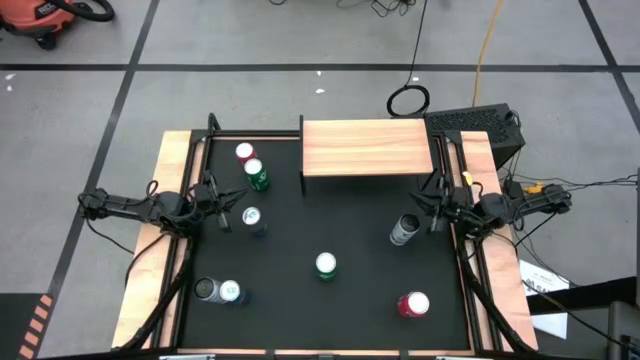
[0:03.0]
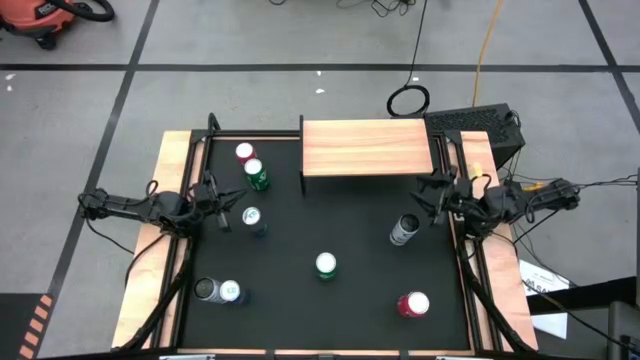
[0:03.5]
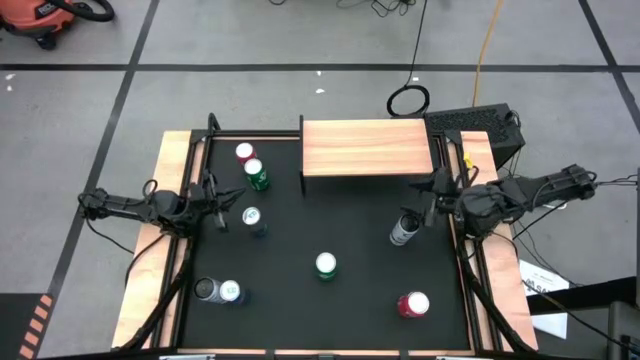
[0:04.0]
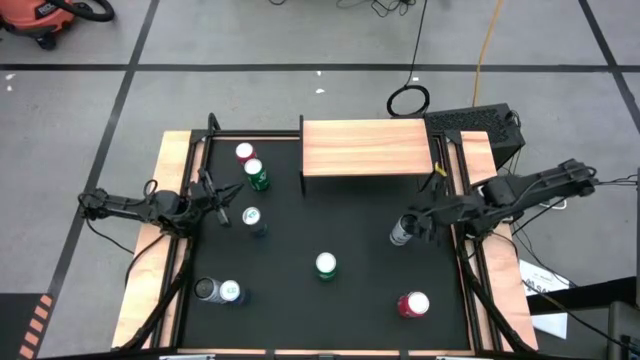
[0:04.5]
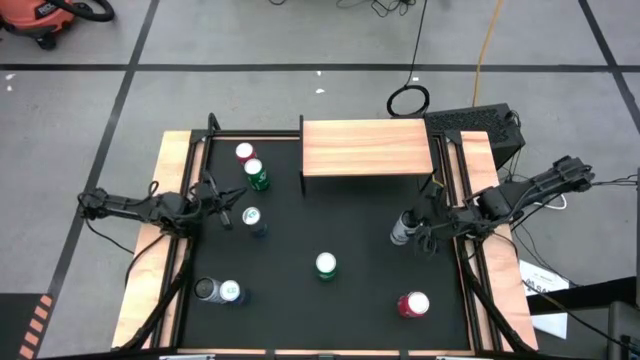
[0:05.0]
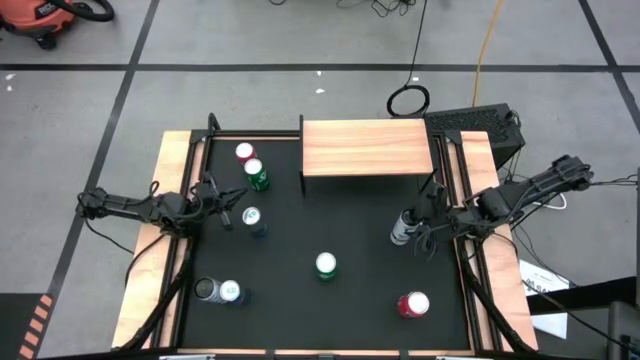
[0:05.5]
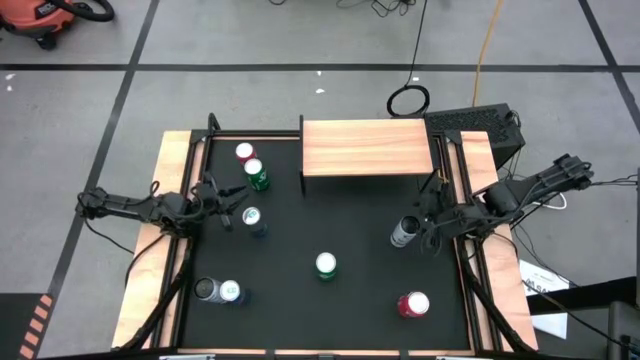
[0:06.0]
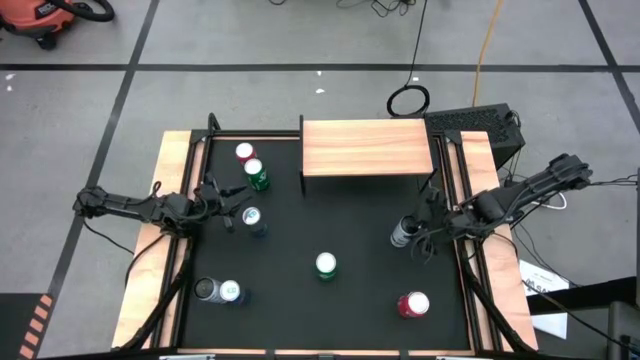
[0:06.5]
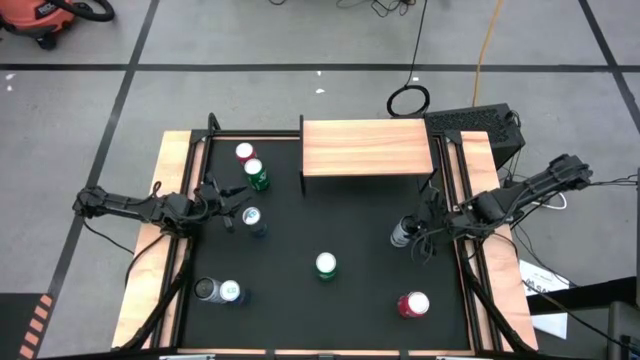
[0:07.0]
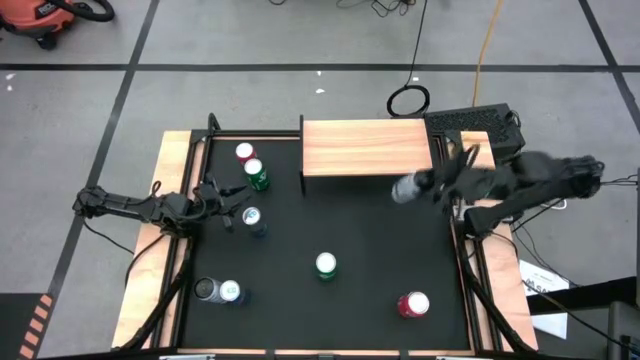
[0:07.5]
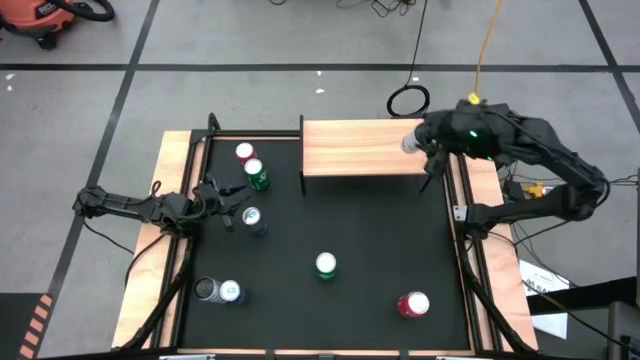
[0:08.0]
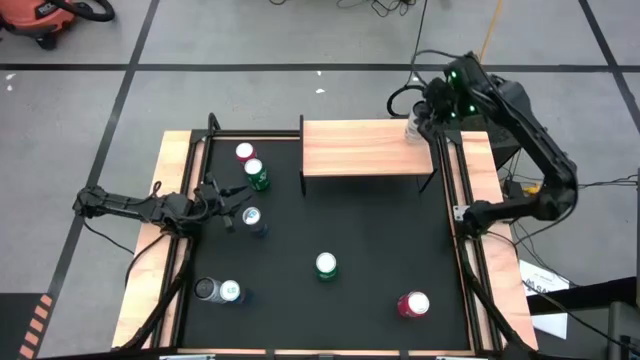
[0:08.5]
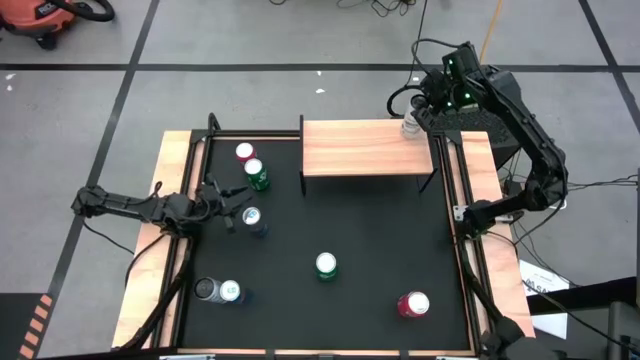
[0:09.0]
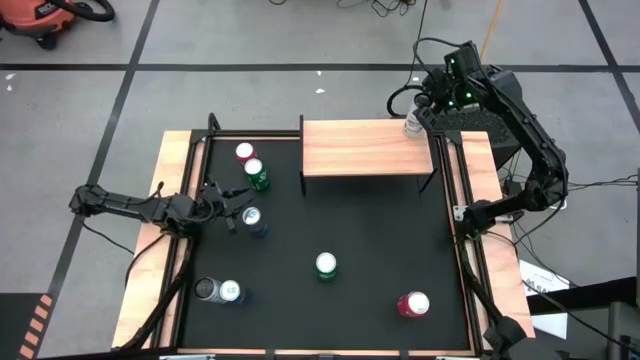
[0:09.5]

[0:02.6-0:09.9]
Task: Place canned beverage on shelf
Put the right white blue soda can on the shelf

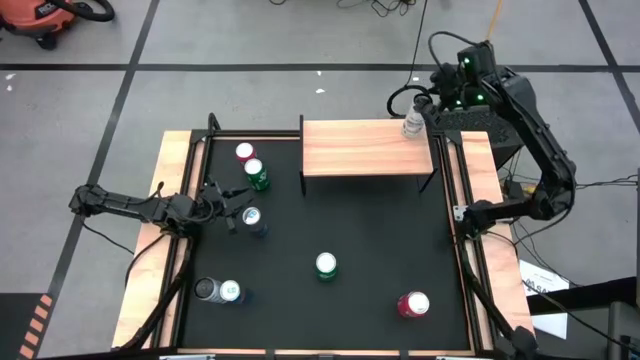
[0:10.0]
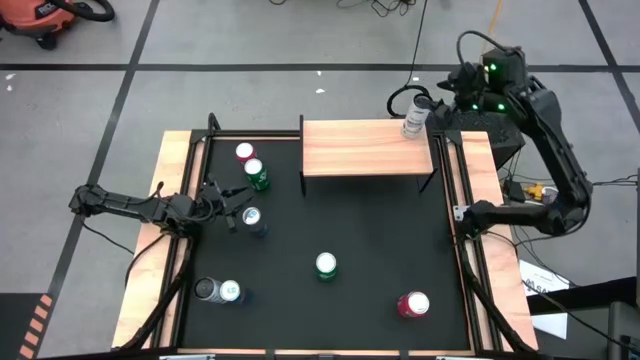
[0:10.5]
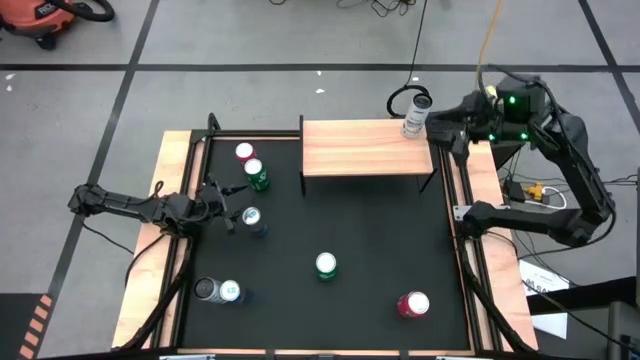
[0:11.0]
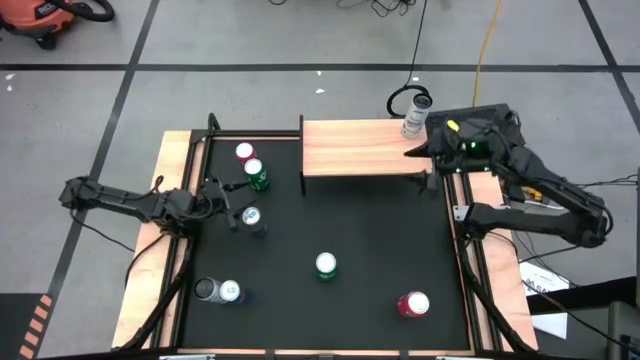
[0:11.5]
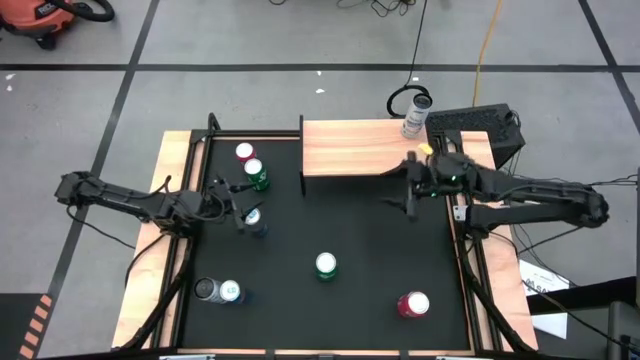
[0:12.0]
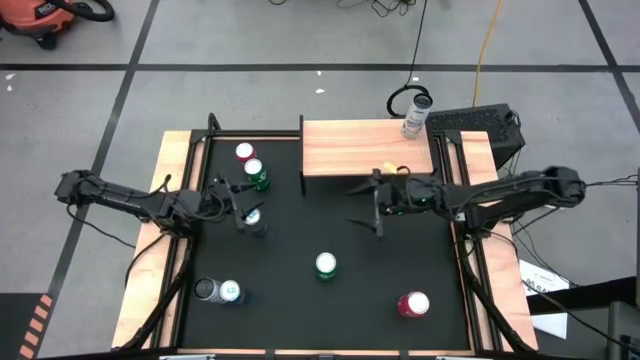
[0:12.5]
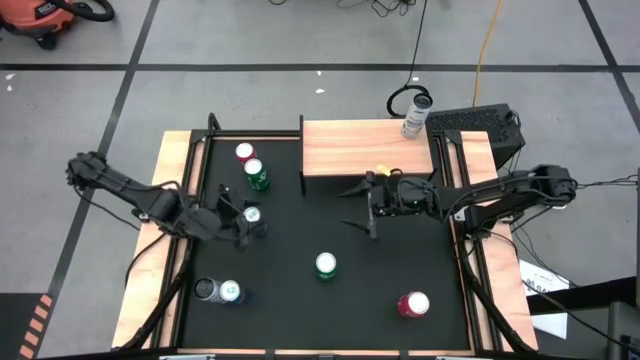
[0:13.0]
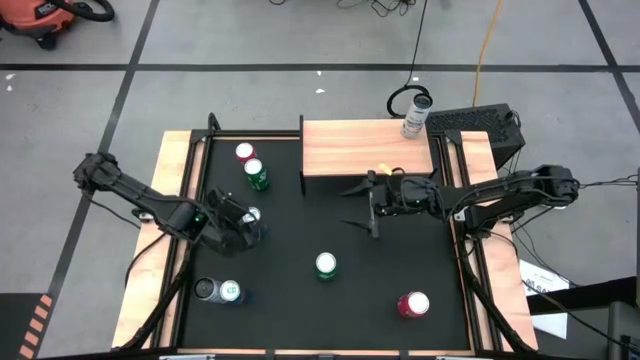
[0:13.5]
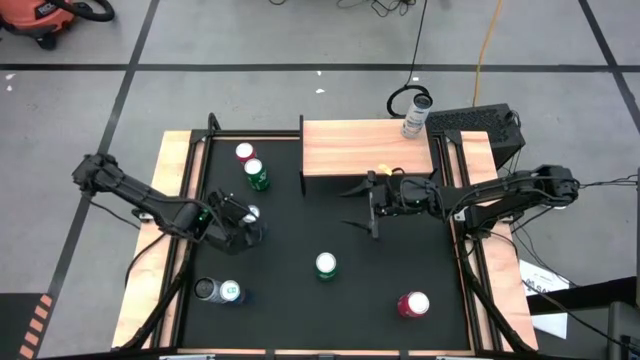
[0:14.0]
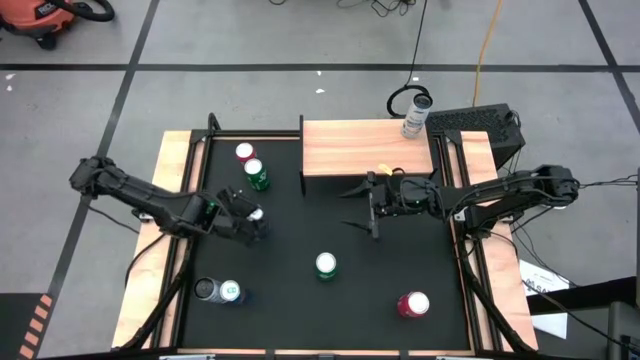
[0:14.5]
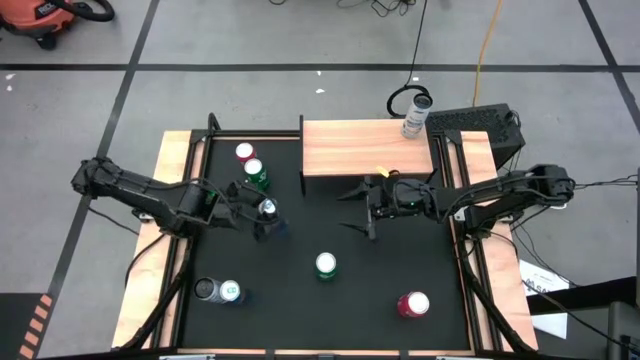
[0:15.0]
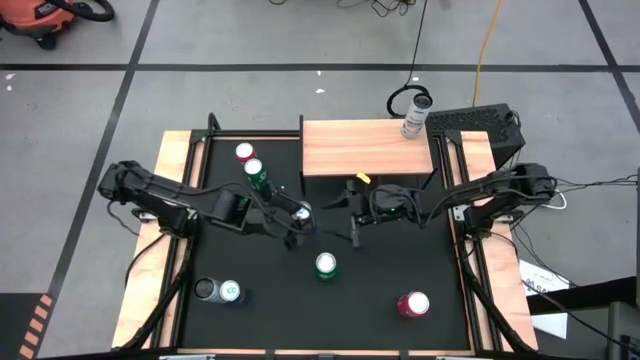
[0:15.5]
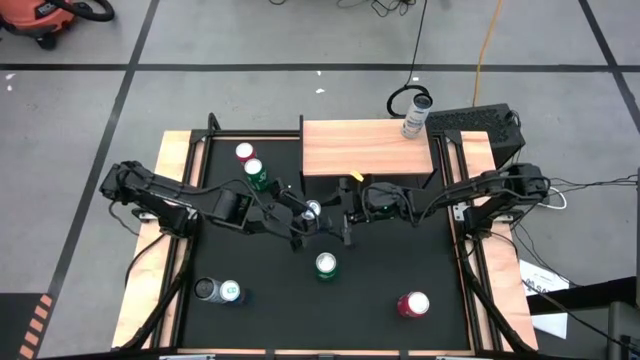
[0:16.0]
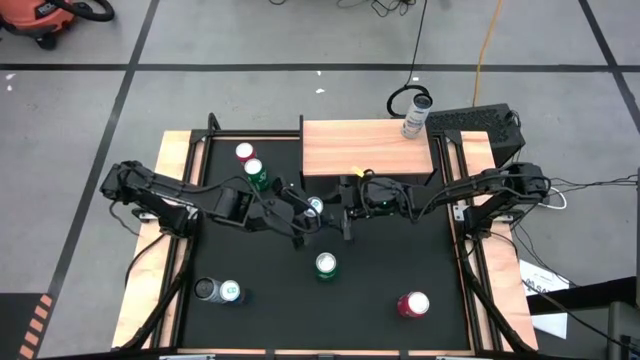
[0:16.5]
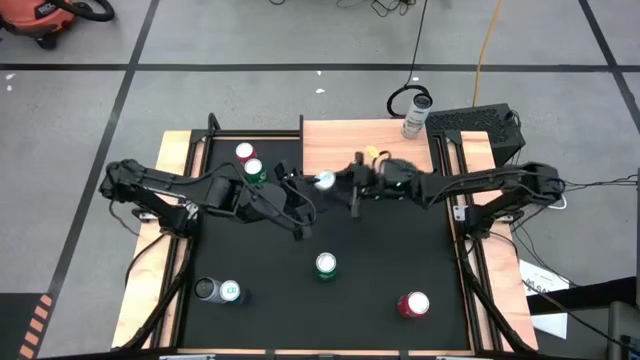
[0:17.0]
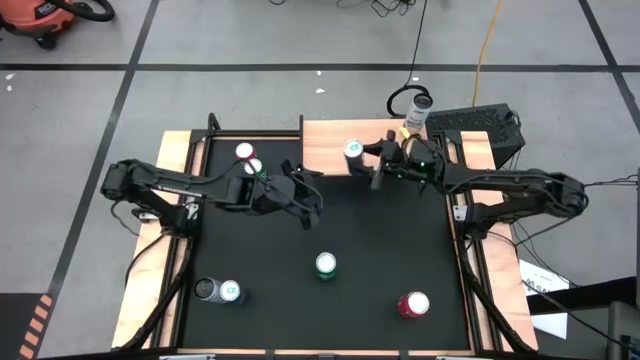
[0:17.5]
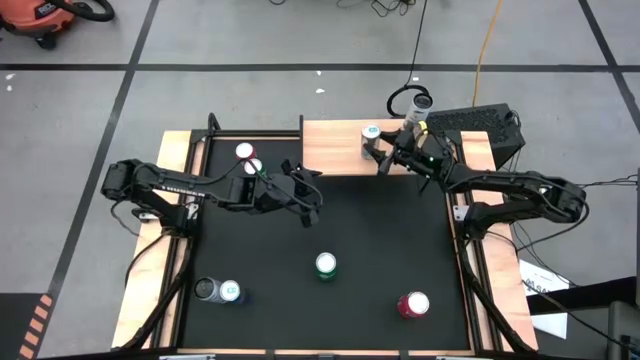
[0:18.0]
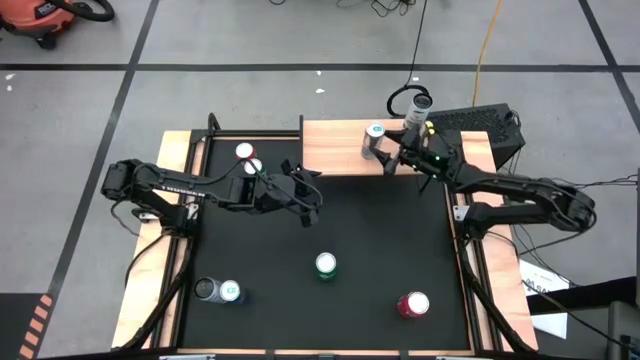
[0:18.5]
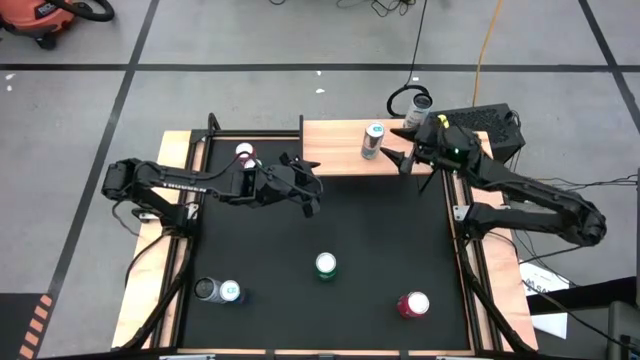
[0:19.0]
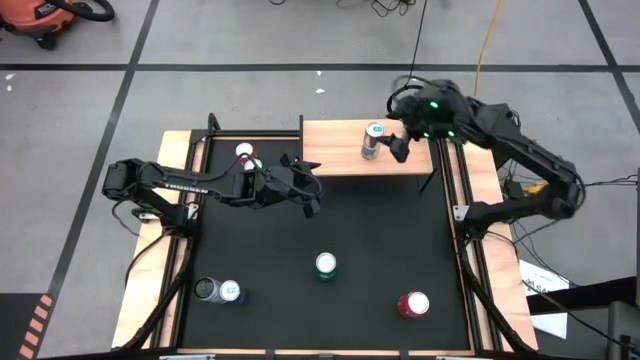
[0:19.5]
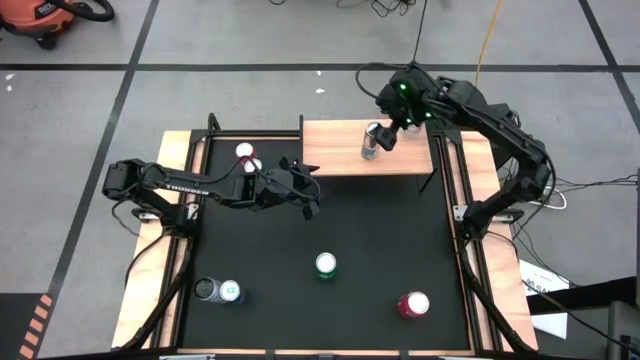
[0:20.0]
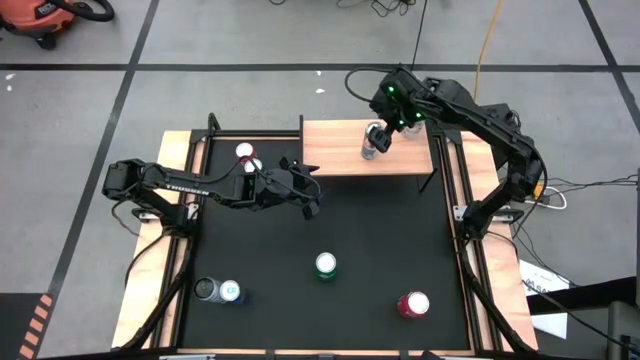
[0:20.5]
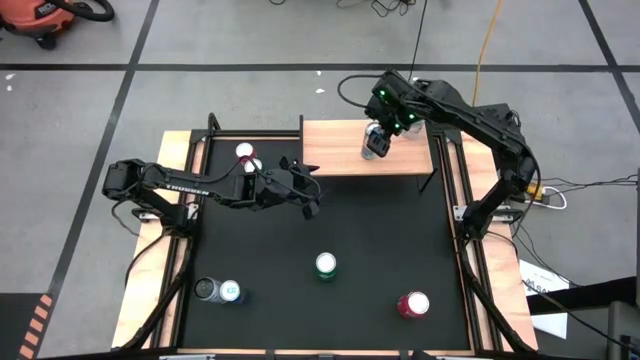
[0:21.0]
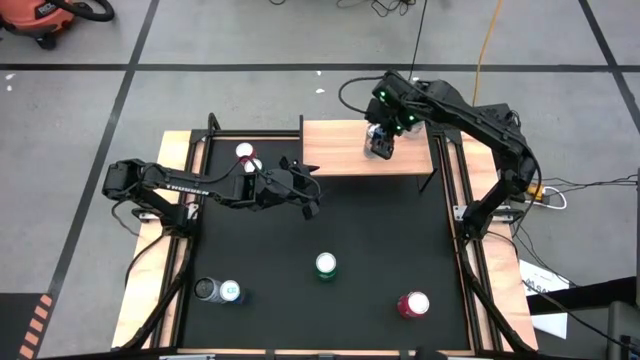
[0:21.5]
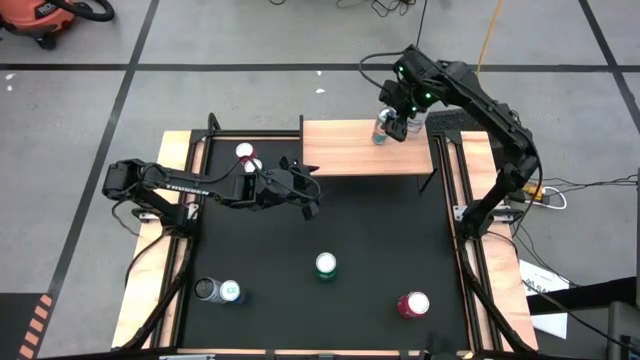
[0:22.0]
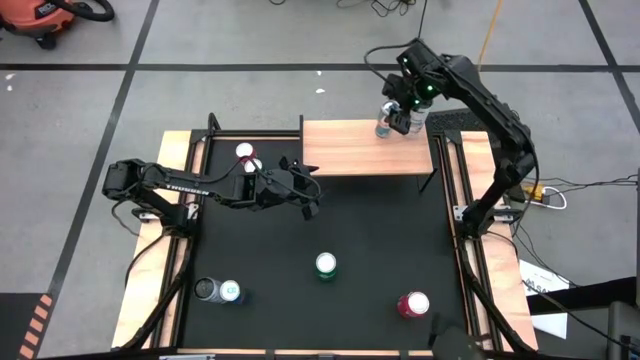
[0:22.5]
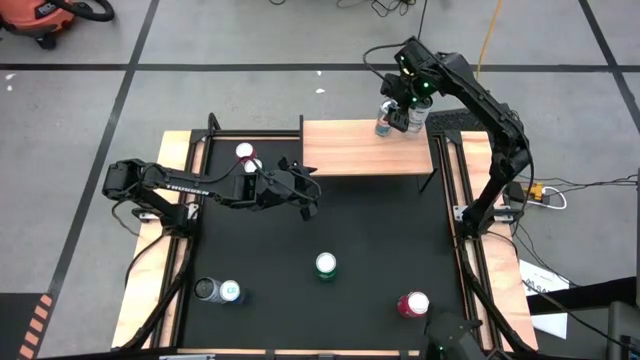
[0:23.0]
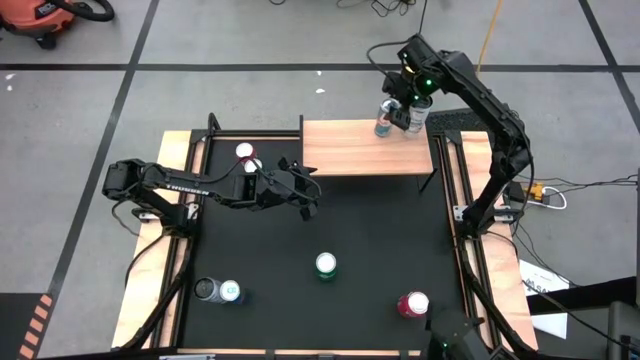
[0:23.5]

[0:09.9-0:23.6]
Put the top blue soda can on the shelf
